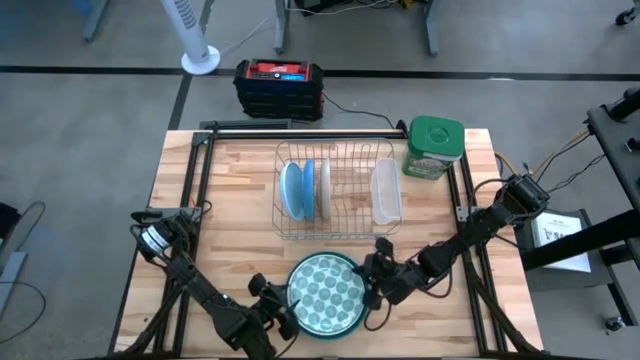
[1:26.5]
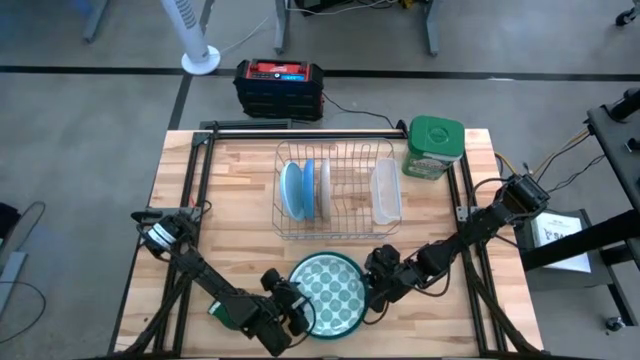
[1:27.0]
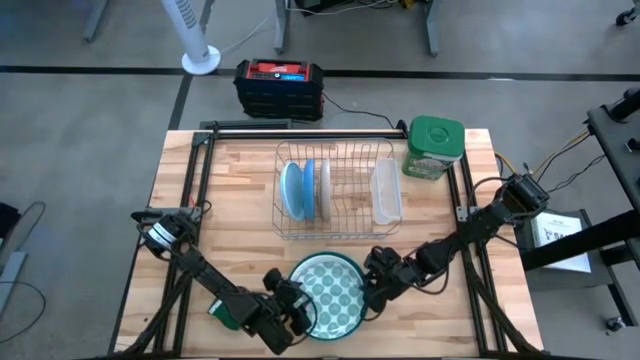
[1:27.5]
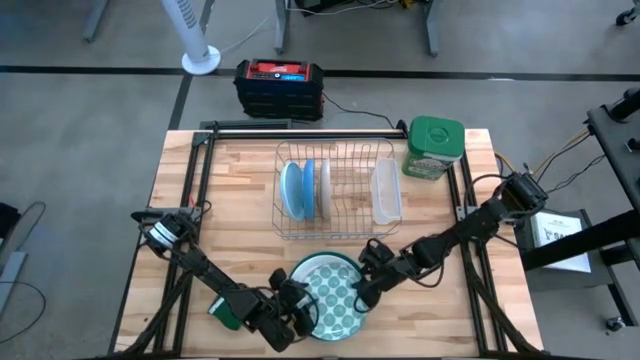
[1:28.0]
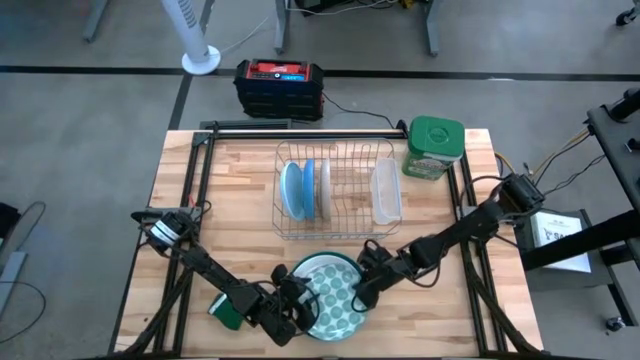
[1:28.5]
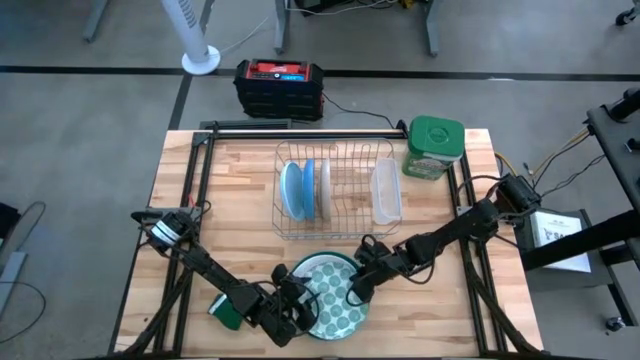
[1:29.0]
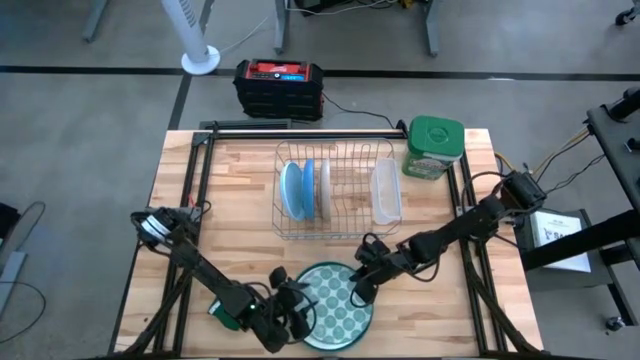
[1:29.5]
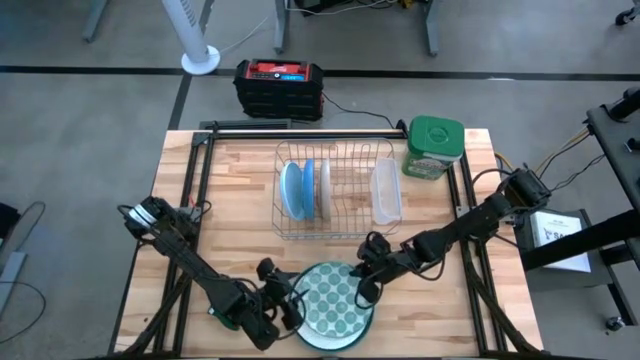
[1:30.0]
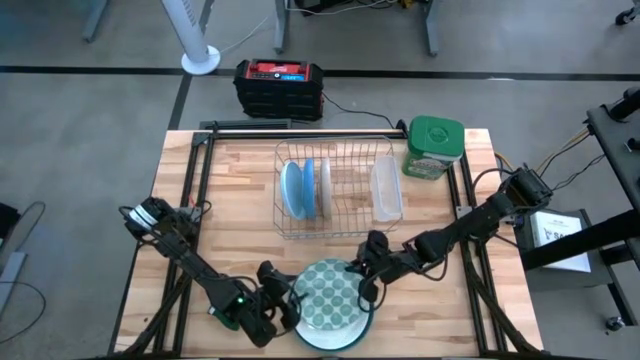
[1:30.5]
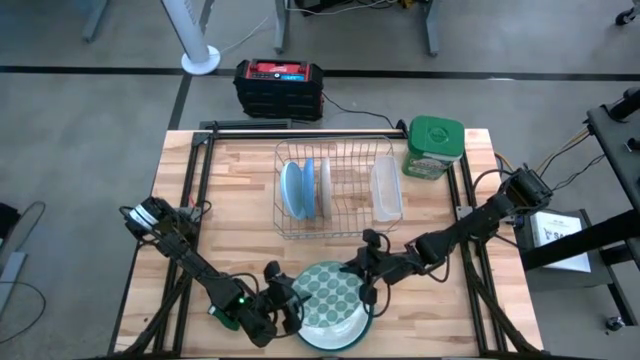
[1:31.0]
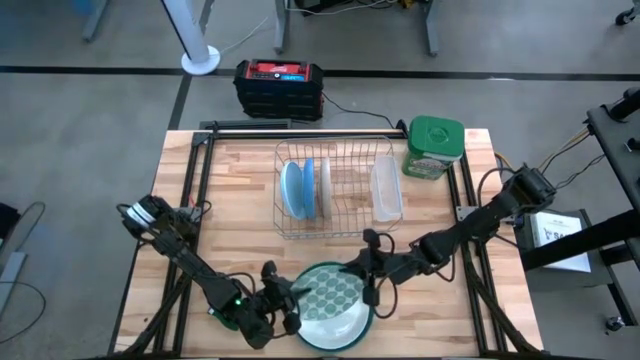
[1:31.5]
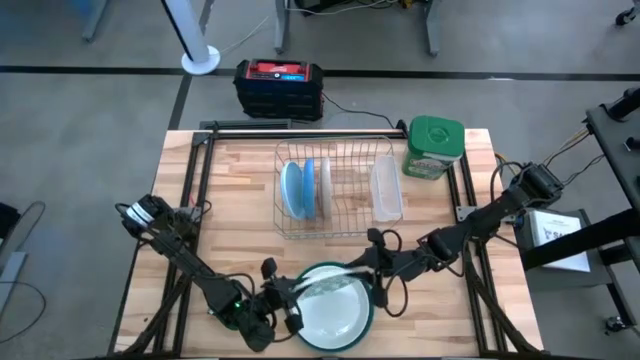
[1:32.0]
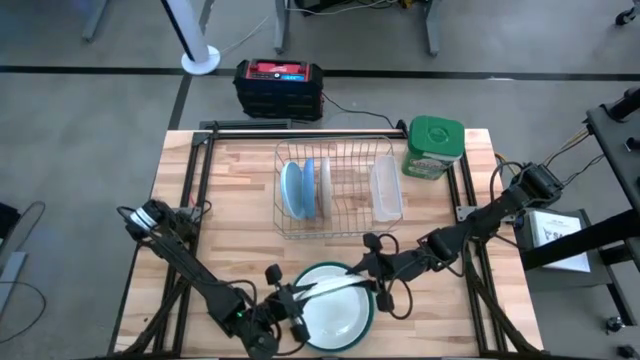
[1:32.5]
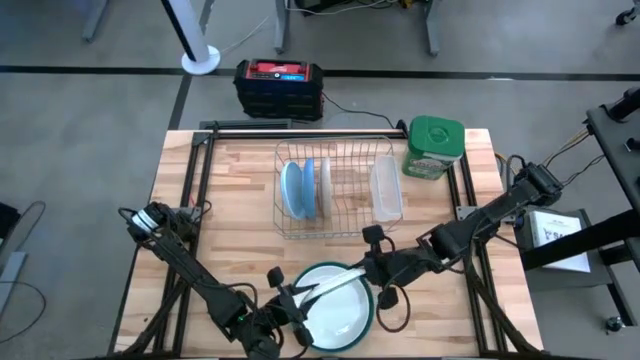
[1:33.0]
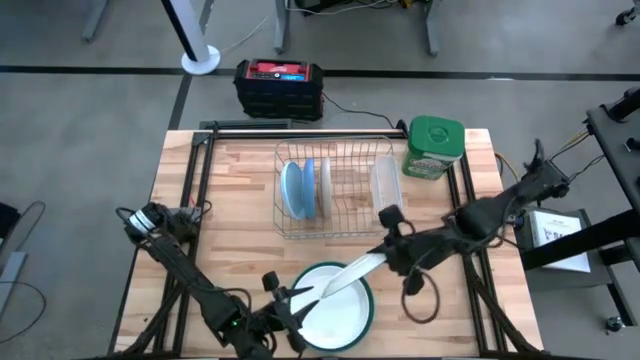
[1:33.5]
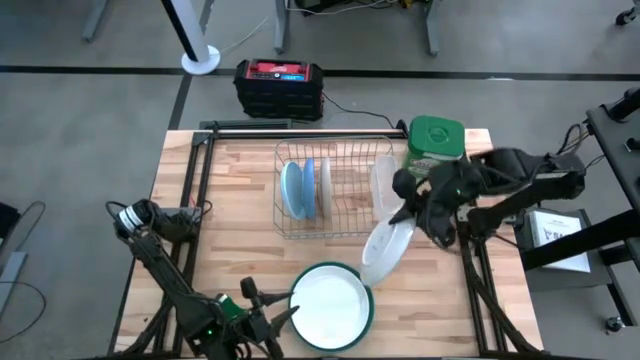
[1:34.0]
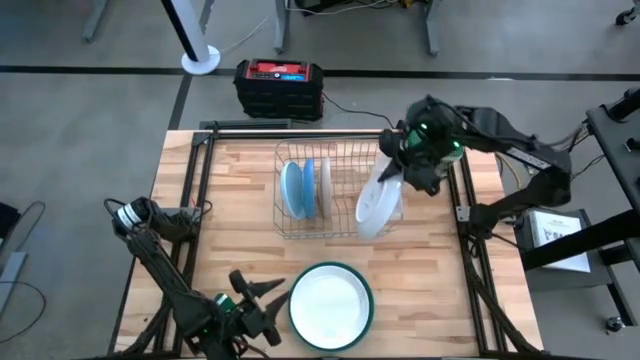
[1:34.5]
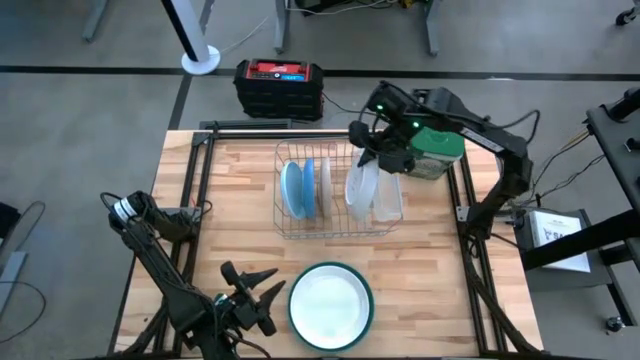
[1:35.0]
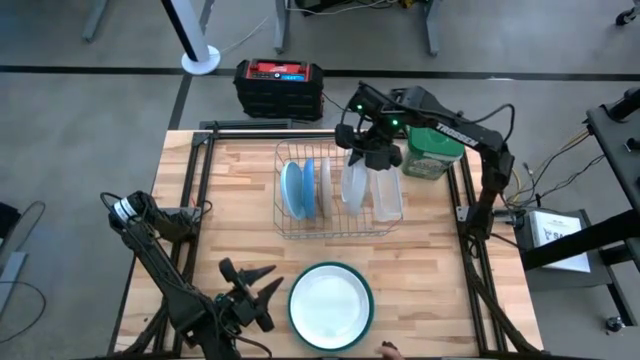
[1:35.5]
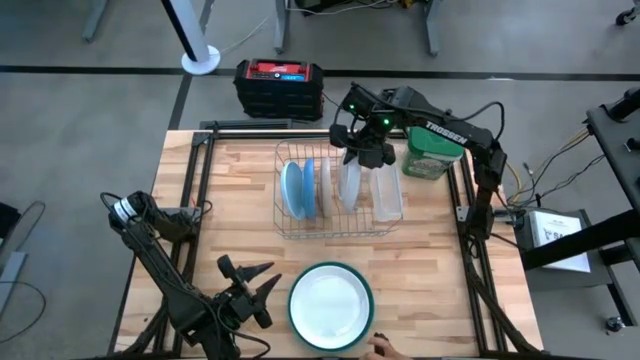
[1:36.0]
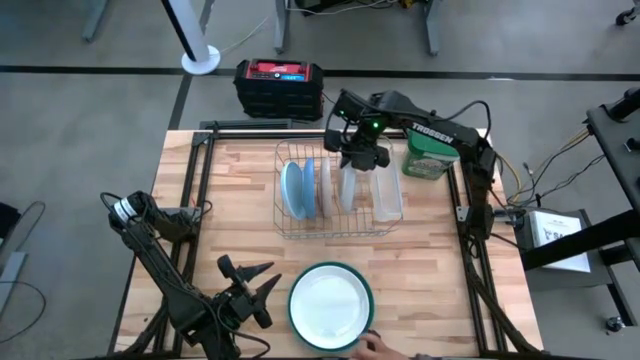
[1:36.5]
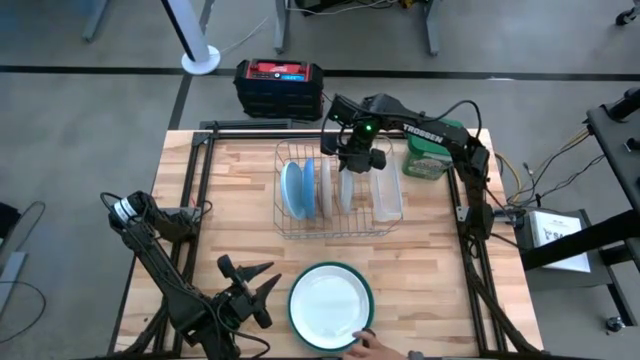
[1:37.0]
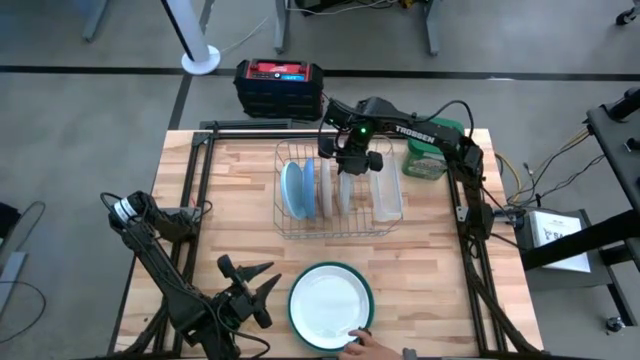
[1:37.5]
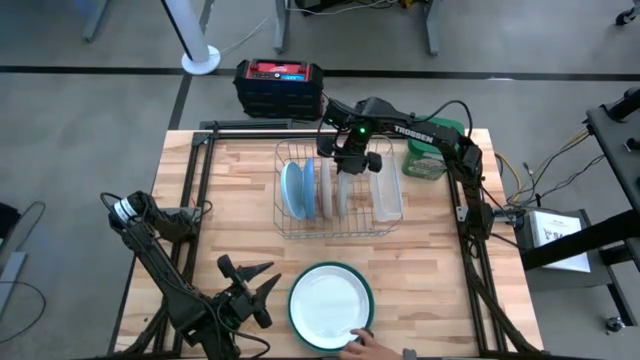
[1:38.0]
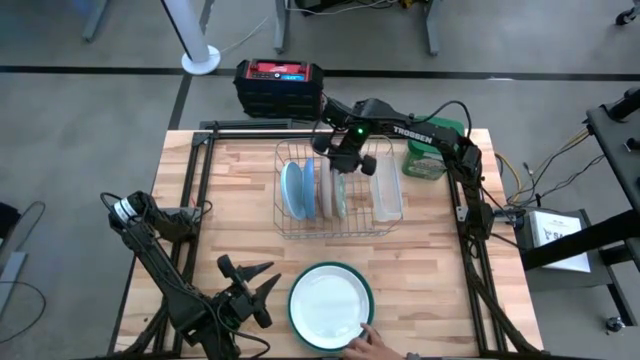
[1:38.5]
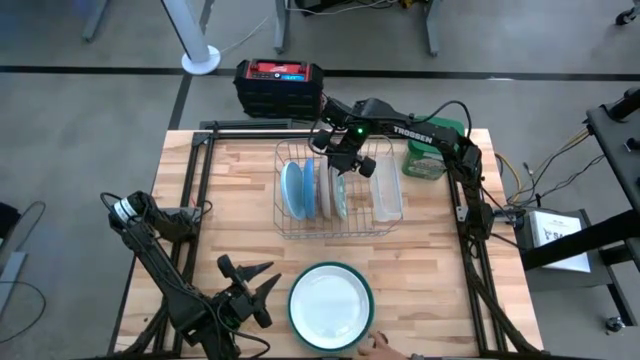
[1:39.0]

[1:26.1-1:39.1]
Task: Sort dishes
Put the green patterned plate in the dish rack

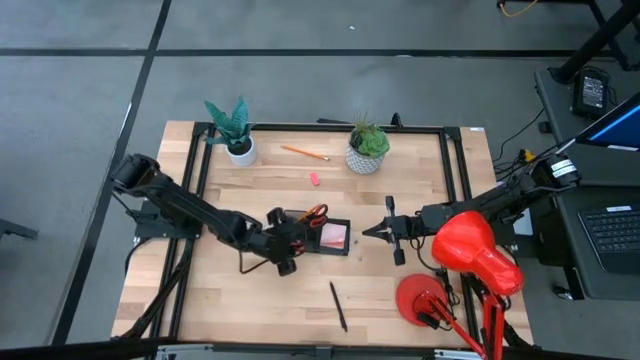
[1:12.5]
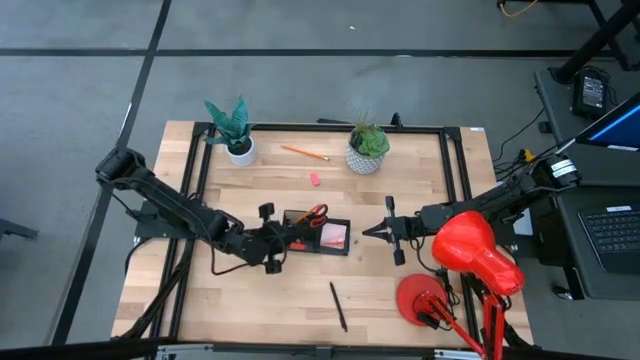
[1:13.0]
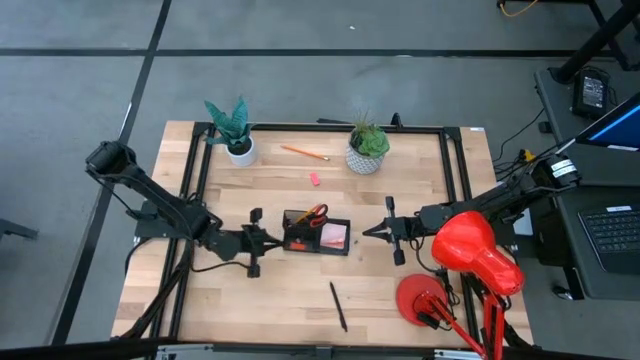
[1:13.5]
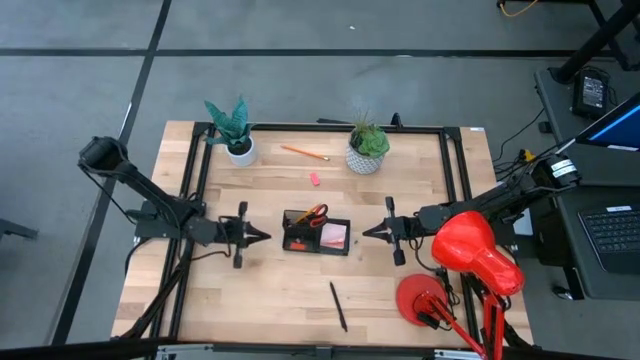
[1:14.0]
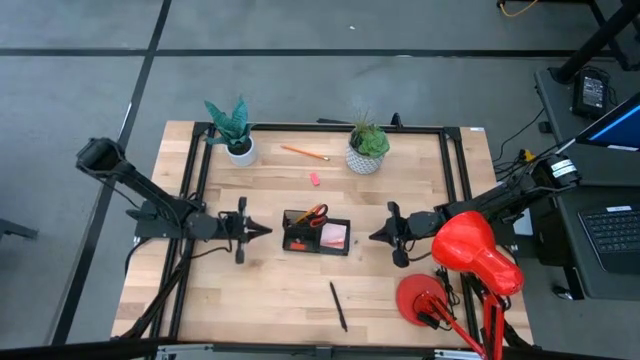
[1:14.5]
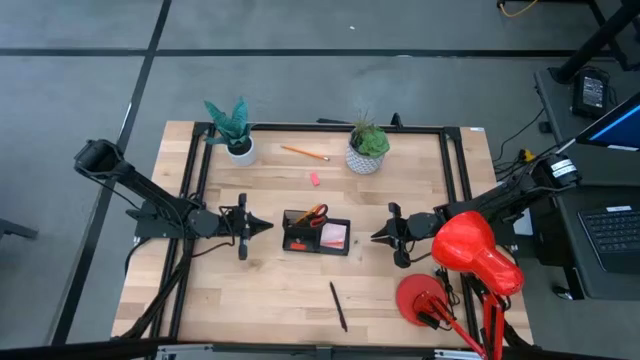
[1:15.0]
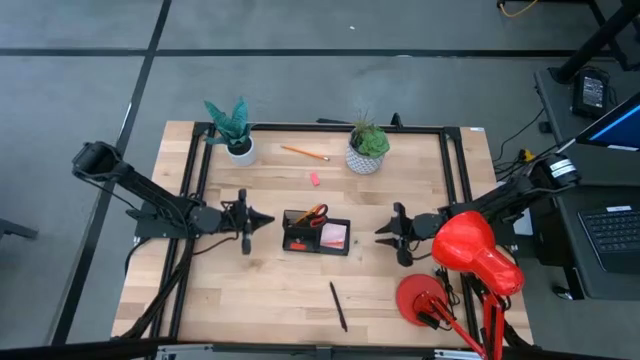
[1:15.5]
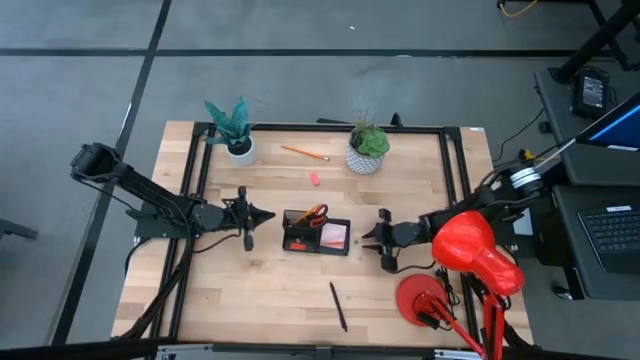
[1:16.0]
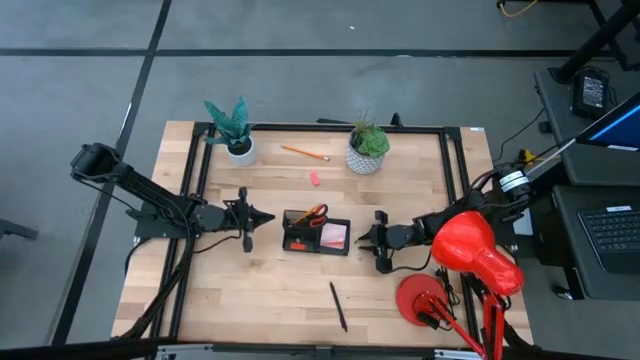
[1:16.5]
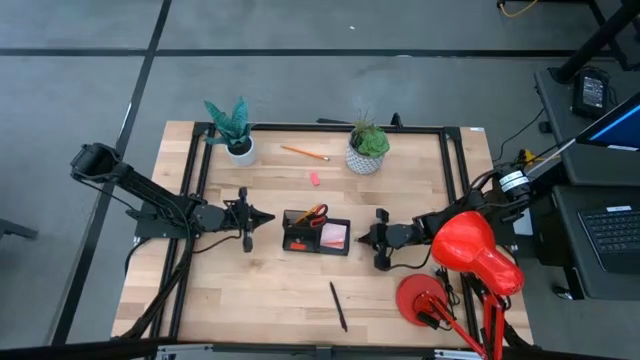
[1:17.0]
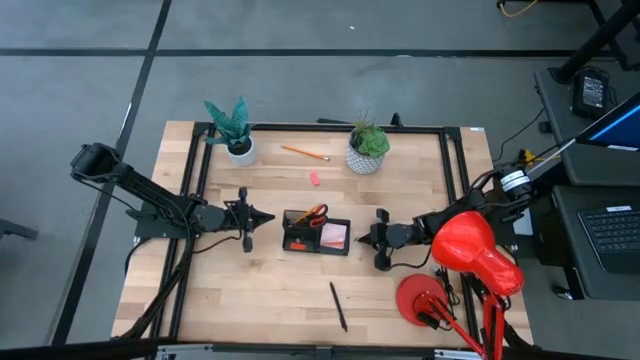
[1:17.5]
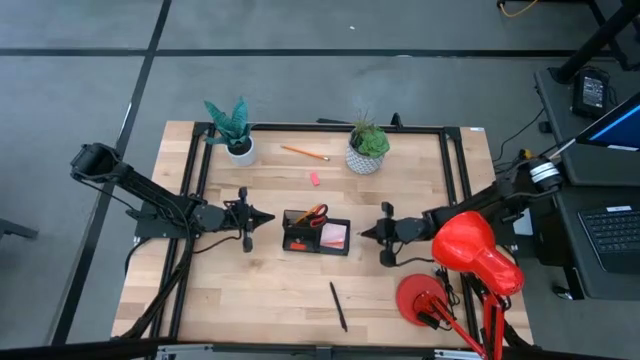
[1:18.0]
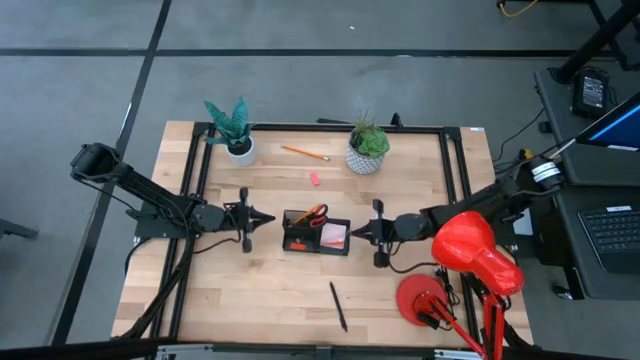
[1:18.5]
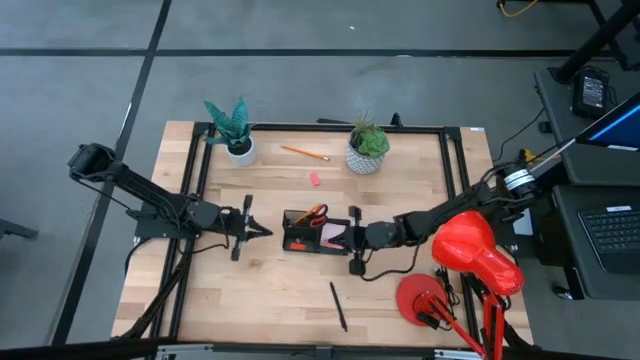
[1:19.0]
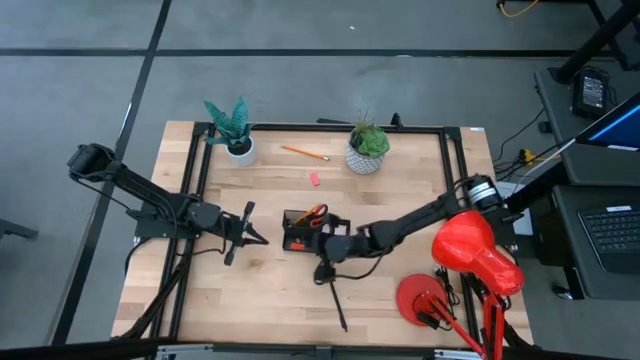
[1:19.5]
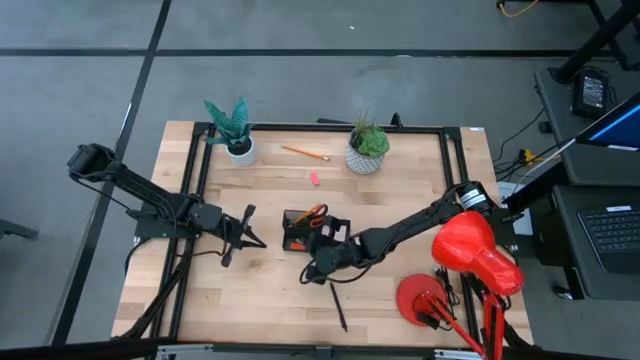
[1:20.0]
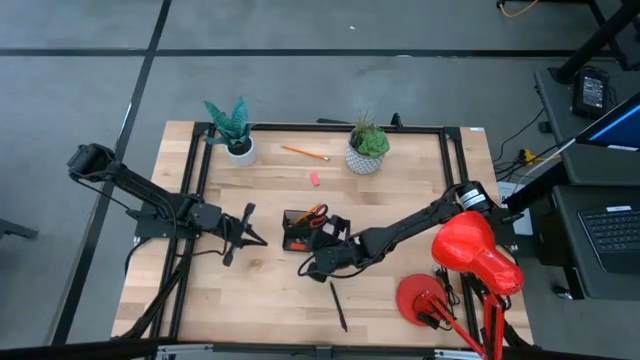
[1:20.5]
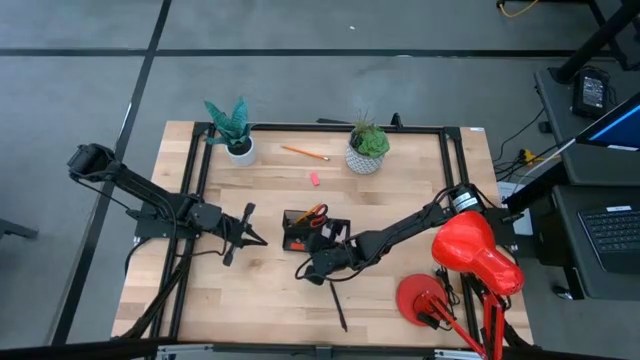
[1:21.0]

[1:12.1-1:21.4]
Task: Pick and place office supplies into organizer
Put the blue binder clip into the desk organizer
